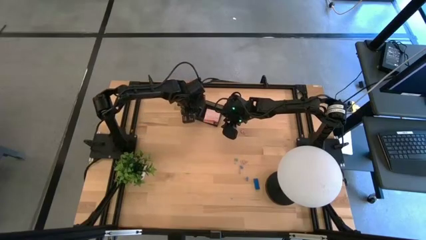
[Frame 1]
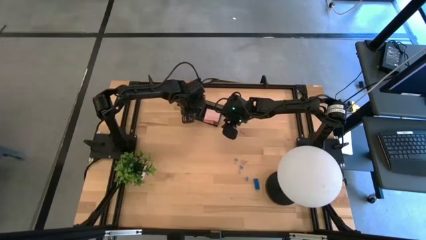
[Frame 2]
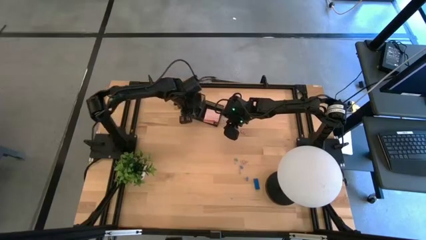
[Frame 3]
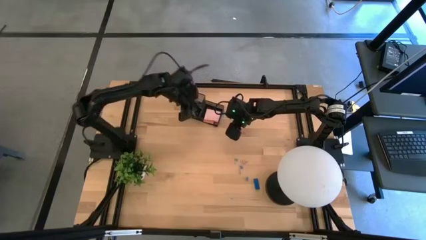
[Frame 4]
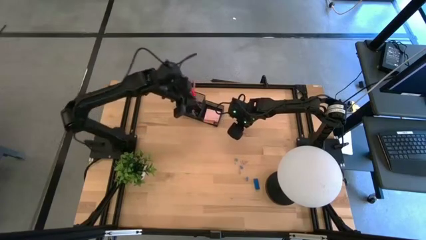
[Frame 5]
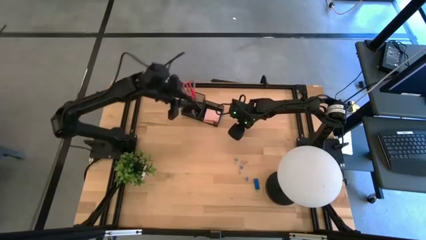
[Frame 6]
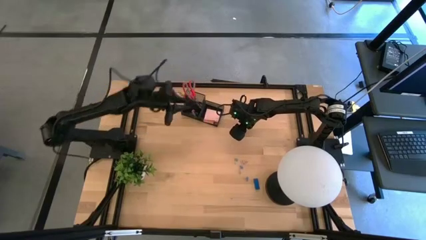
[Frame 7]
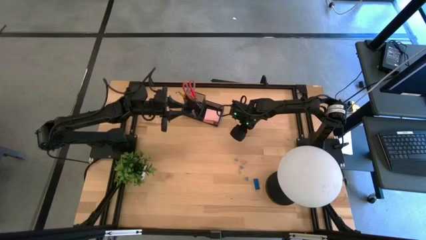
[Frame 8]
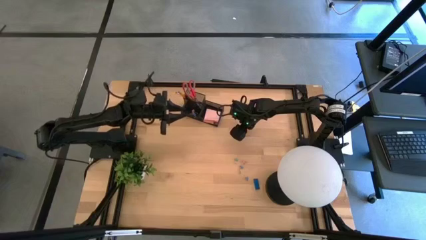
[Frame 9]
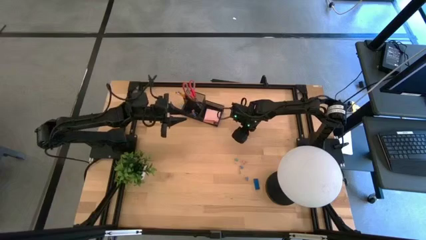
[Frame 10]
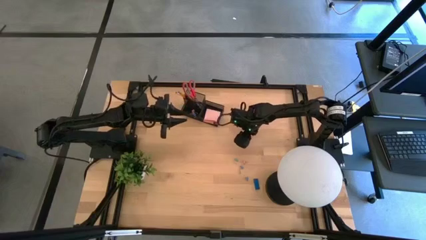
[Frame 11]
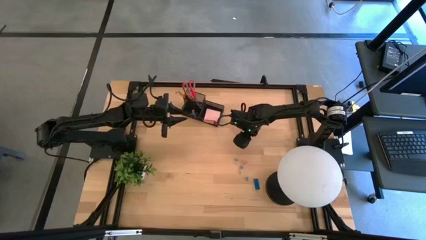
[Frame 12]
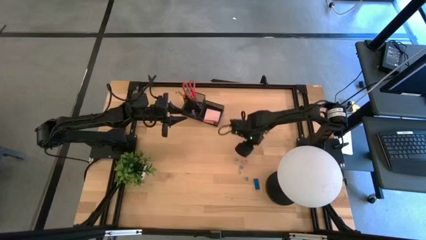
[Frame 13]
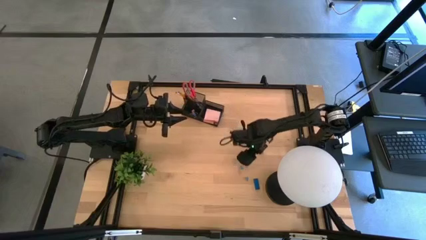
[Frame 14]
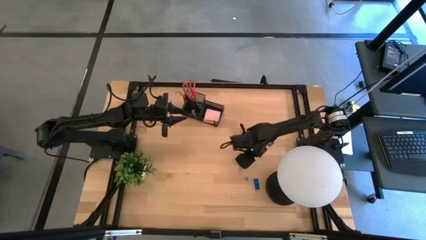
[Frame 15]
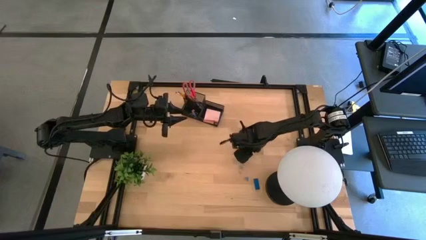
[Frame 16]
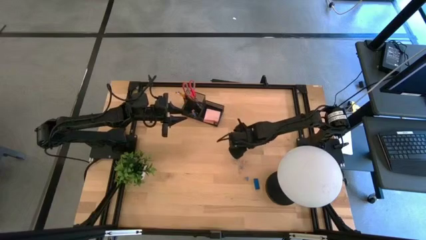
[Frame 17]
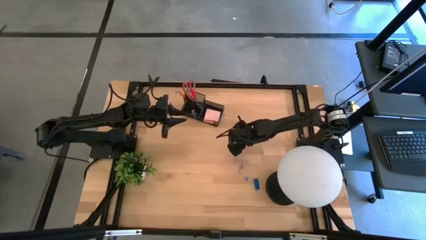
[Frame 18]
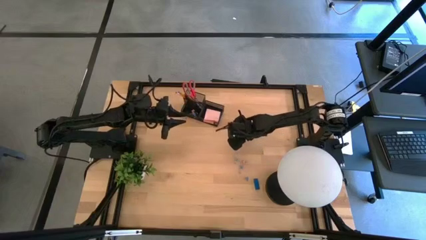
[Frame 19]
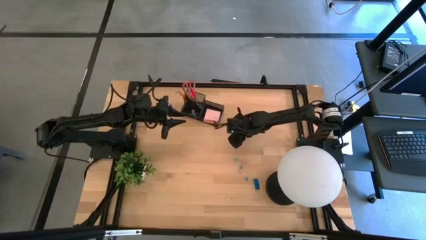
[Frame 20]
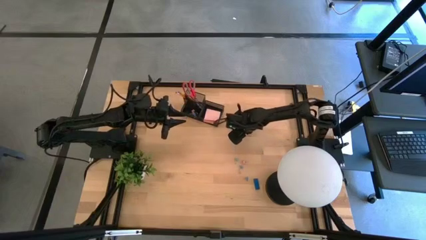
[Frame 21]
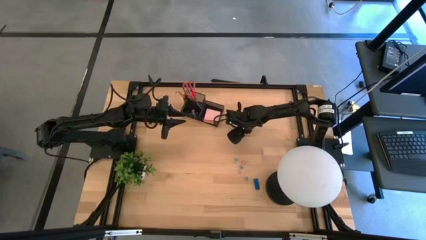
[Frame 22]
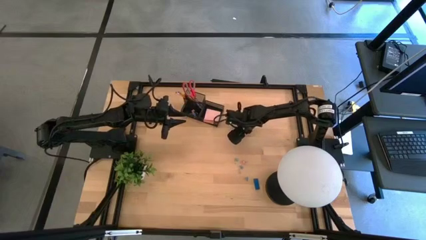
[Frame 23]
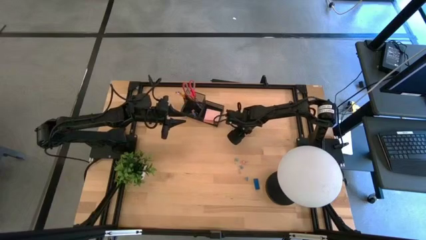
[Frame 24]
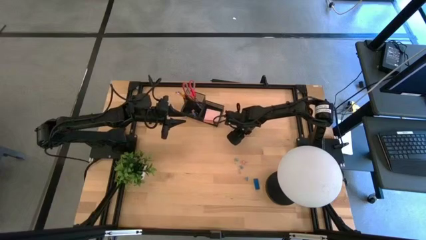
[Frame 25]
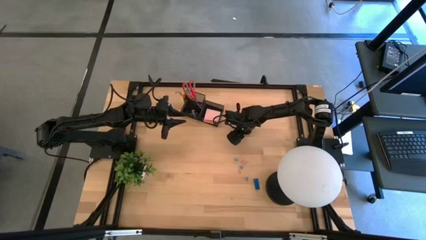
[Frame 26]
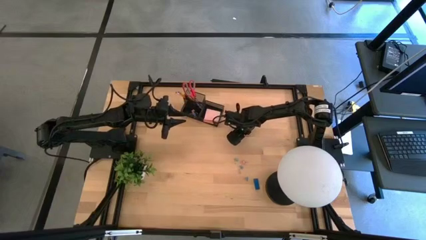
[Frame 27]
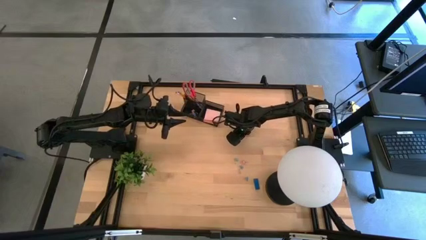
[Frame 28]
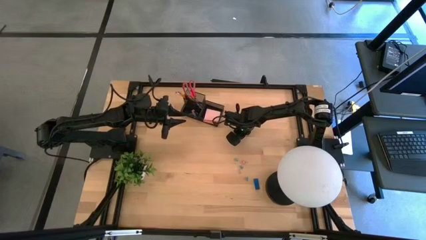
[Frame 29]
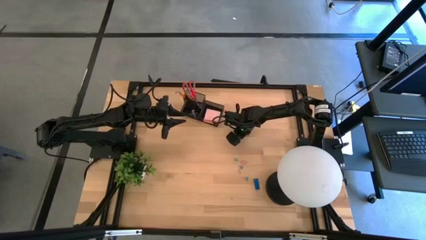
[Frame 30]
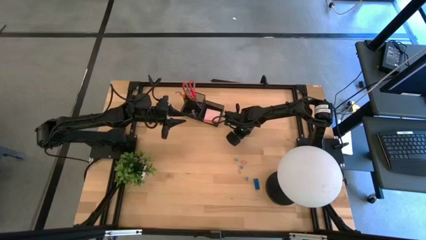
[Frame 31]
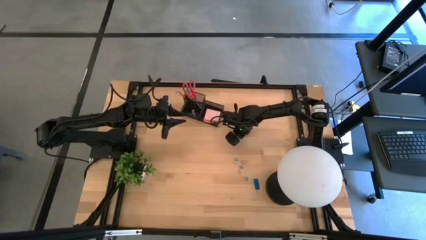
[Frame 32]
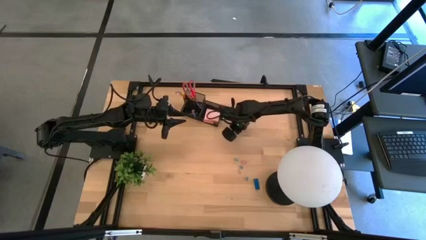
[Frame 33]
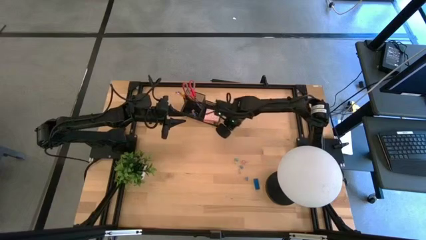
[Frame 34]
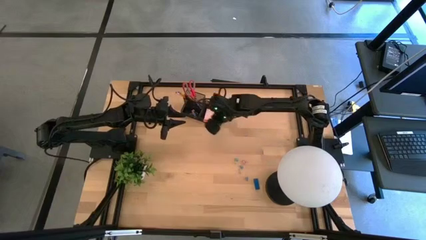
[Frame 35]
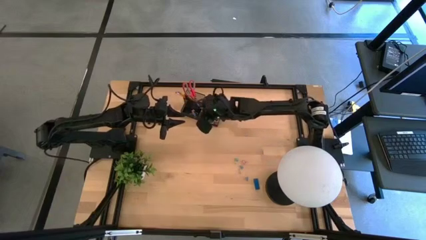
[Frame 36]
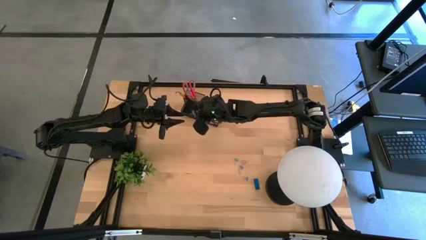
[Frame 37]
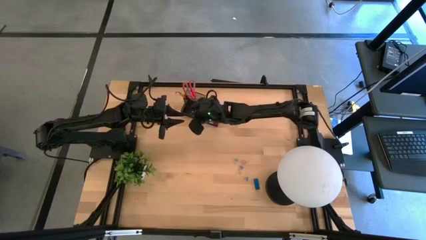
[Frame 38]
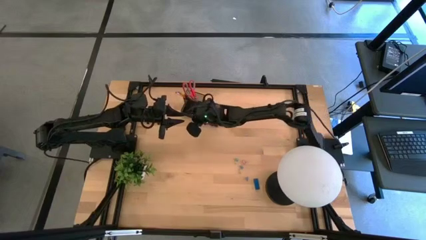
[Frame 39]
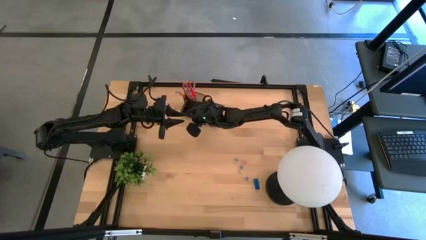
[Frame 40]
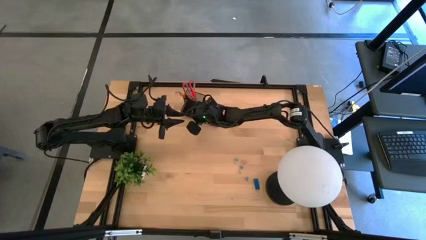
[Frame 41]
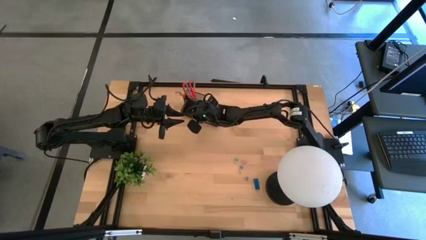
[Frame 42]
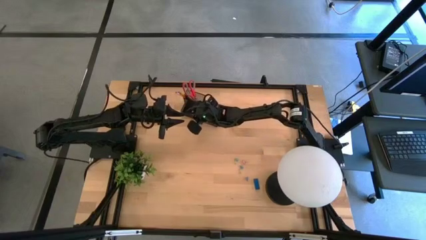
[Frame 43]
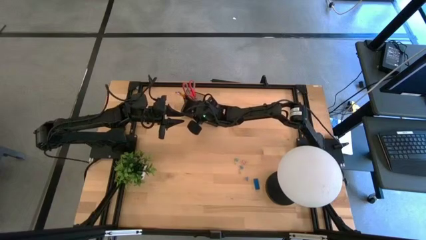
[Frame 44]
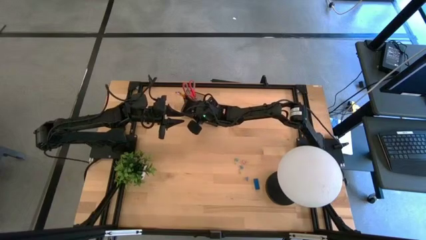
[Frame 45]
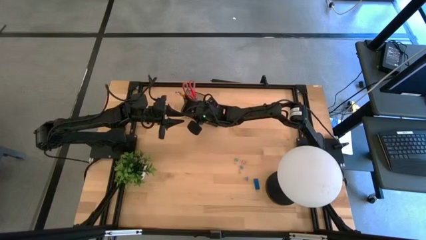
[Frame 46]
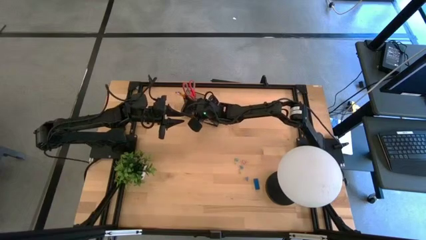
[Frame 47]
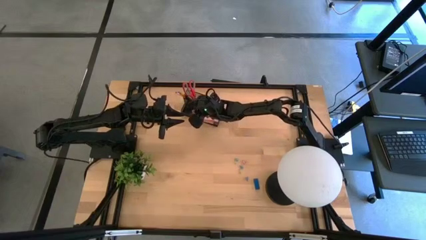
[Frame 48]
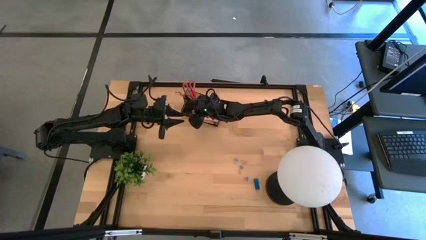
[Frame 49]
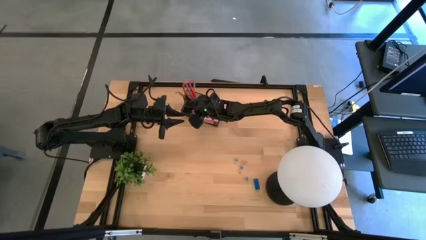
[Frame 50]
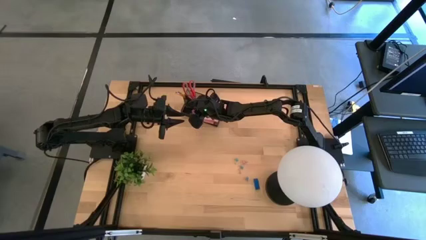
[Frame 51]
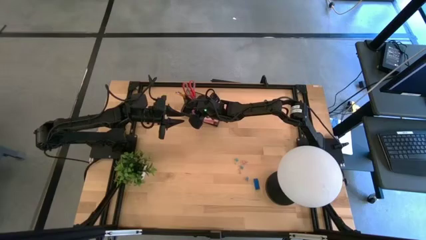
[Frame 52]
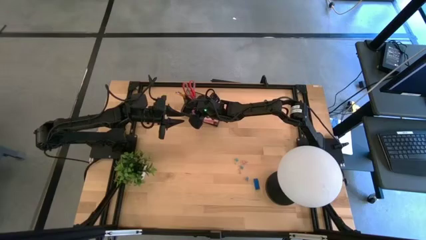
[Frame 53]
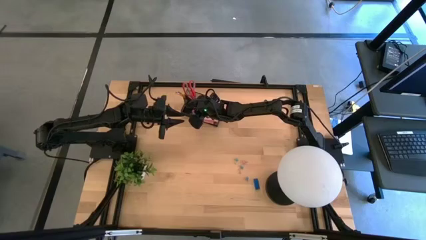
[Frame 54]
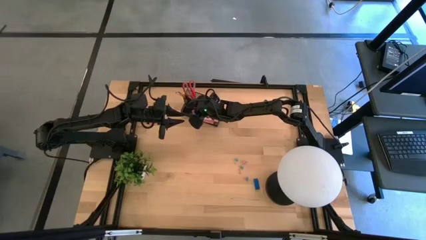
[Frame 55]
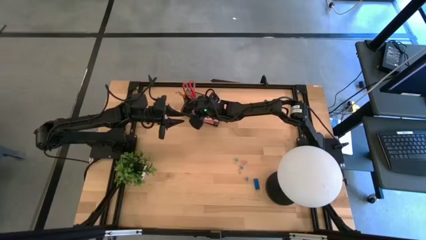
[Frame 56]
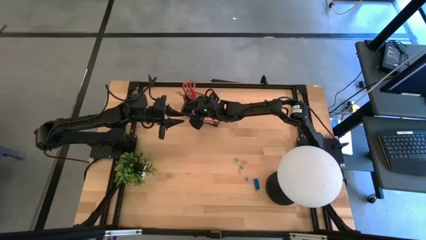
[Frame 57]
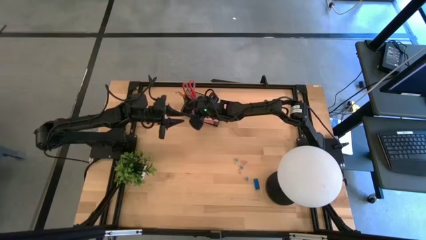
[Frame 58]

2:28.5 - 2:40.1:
Task: Pick and place office supplies into organizer
Put the pink binder clip into the black desk organizer

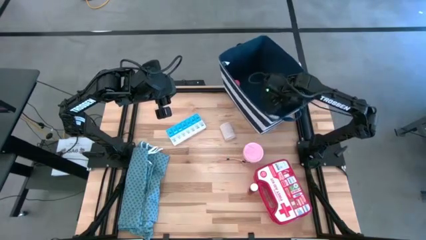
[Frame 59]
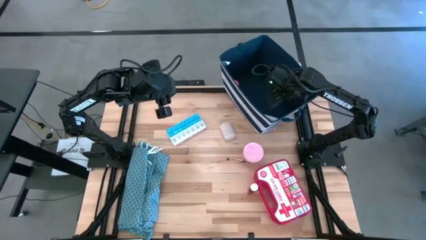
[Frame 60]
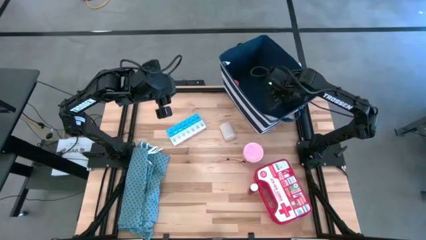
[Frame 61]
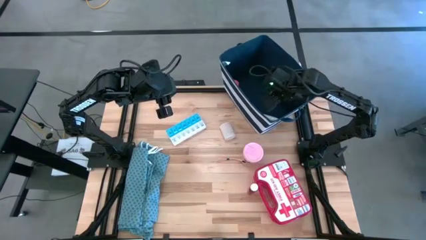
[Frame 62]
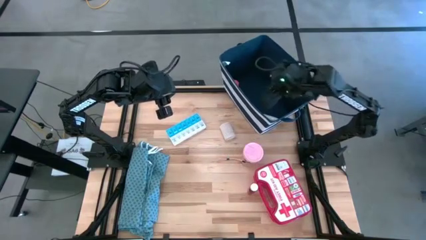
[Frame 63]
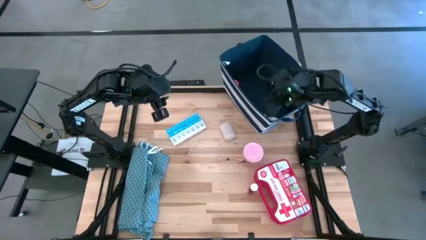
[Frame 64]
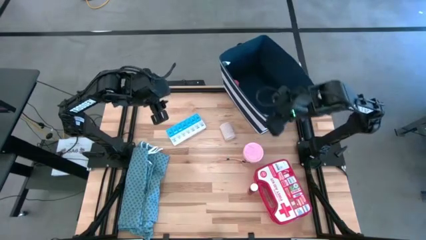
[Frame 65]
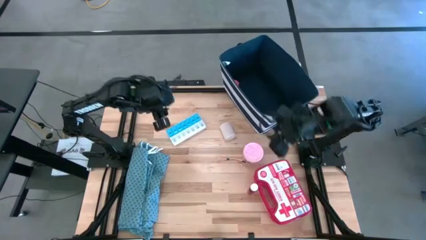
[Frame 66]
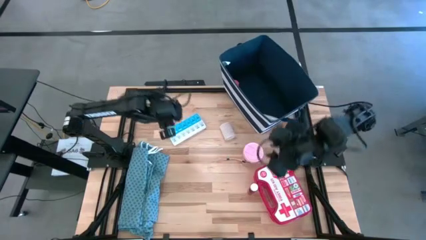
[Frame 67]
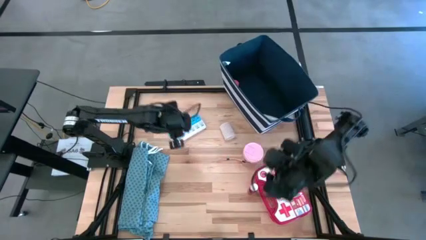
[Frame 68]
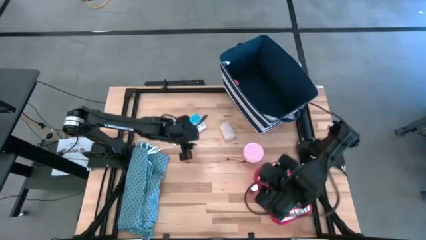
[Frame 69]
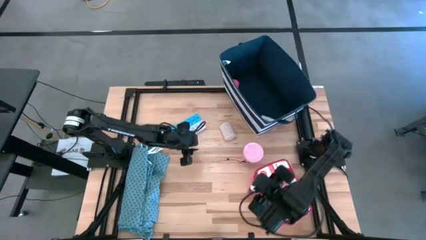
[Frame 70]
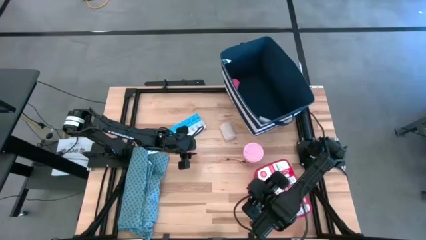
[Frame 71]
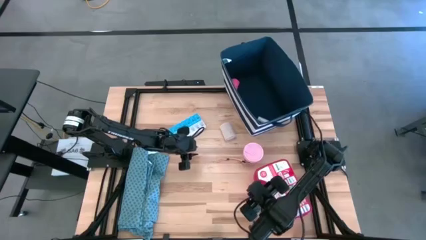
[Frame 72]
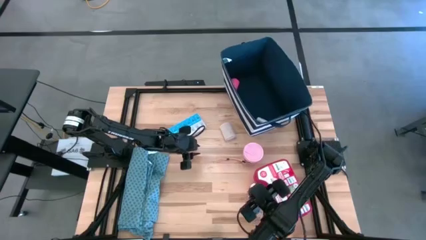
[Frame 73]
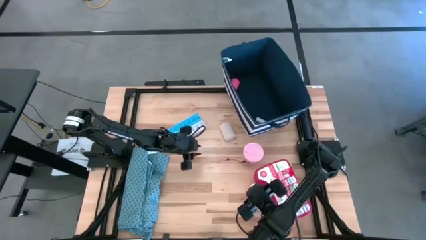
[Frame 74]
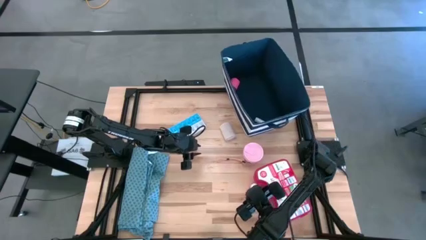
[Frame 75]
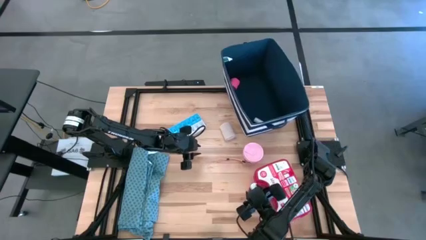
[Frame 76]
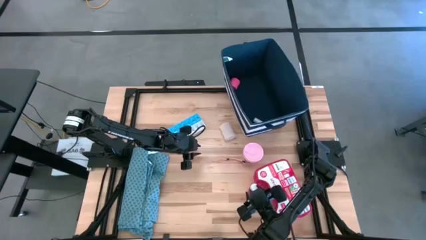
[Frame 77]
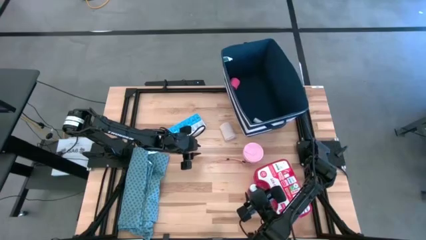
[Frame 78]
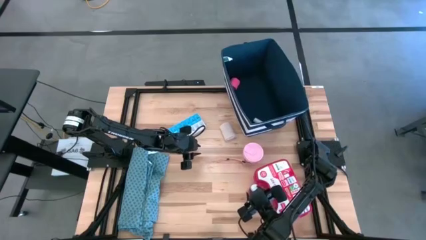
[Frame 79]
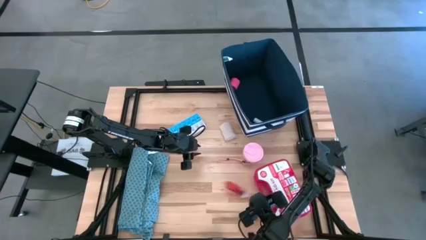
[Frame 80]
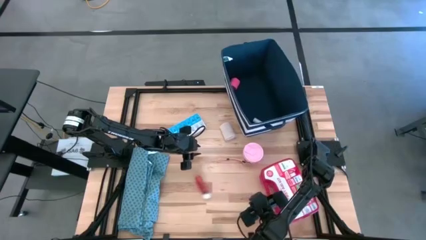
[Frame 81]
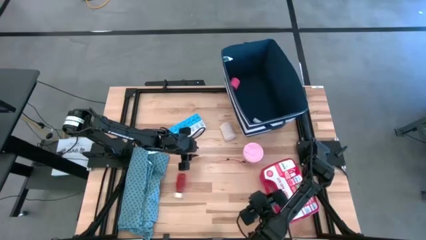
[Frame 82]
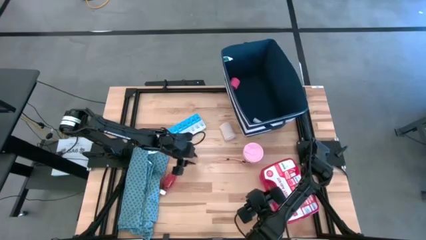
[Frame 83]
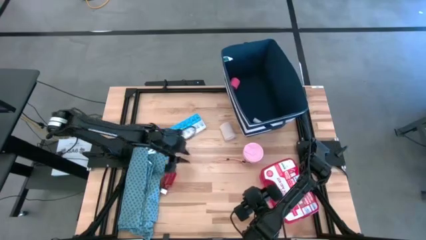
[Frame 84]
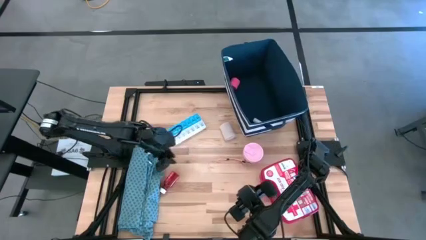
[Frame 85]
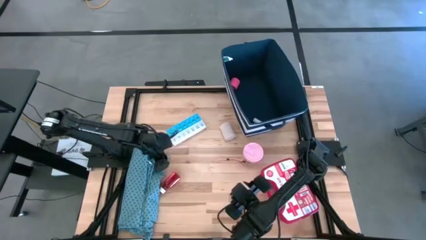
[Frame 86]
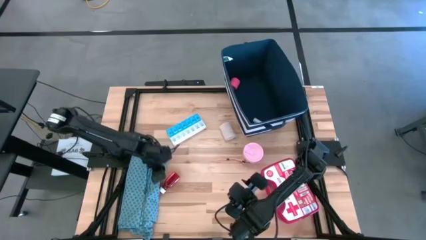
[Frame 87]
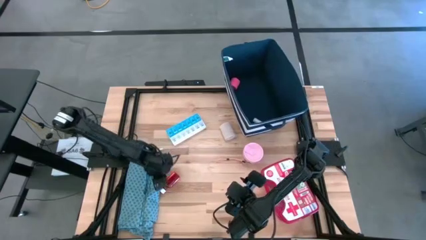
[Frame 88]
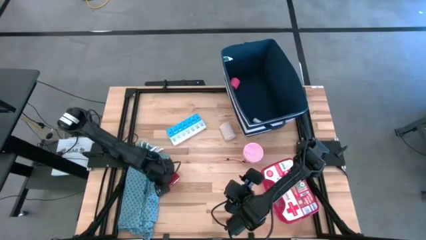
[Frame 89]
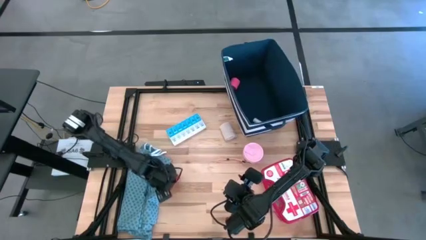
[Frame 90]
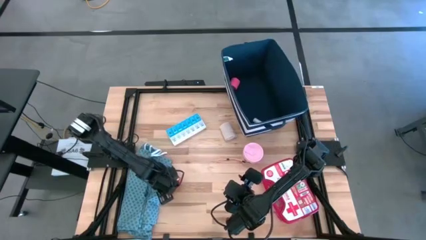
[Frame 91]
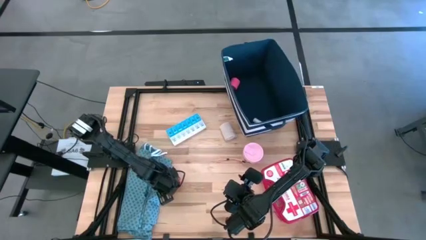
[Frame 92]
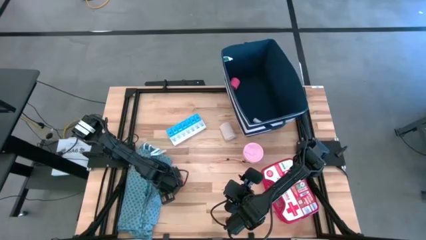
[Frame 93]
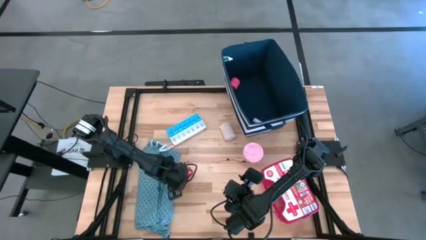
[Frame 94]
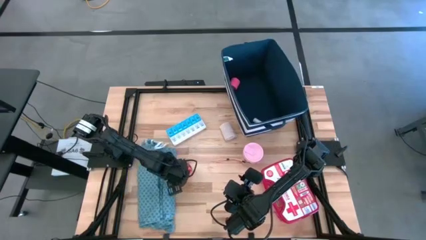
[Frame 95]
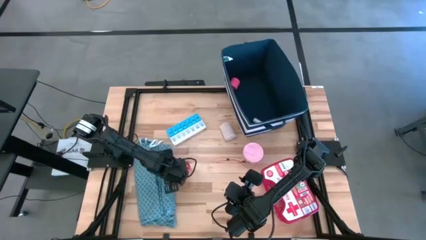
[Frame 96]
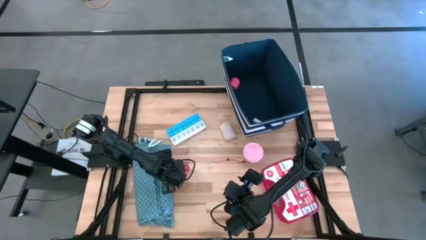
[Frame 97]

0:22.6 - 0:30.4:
Task: Pick & place medical supplies in basket/bin
Put the red medicine bottle into the blue bin
